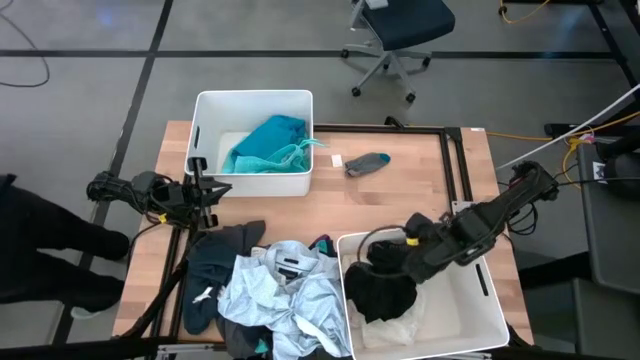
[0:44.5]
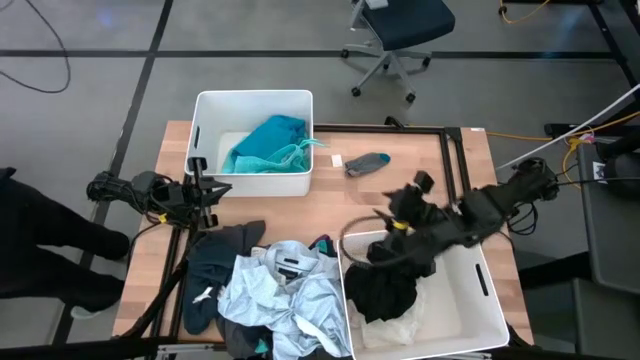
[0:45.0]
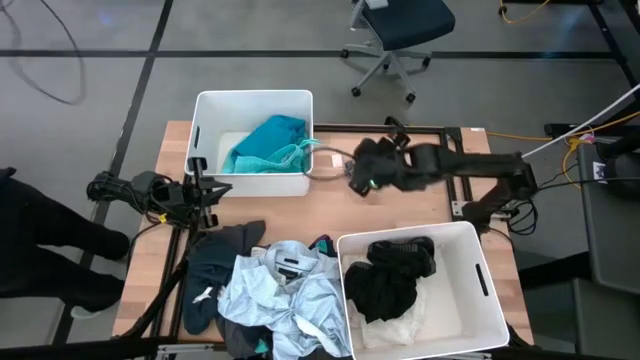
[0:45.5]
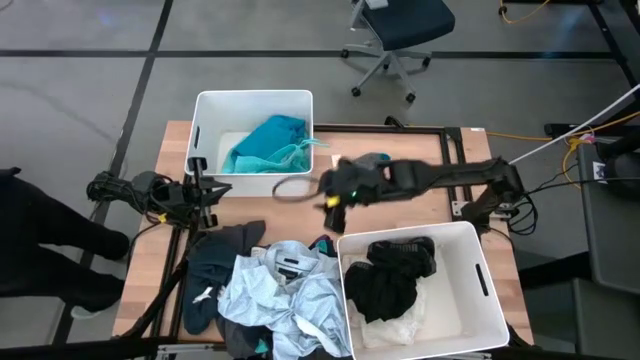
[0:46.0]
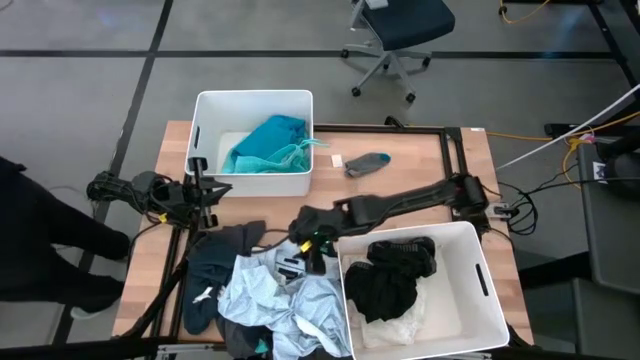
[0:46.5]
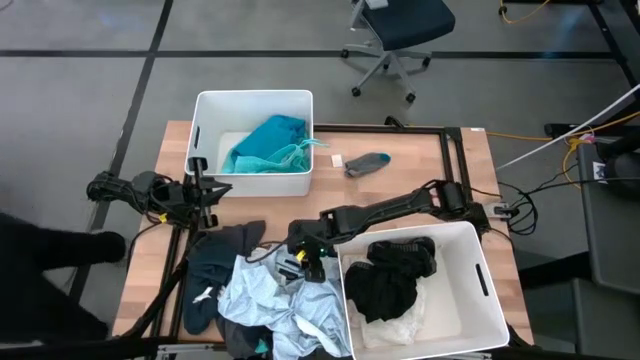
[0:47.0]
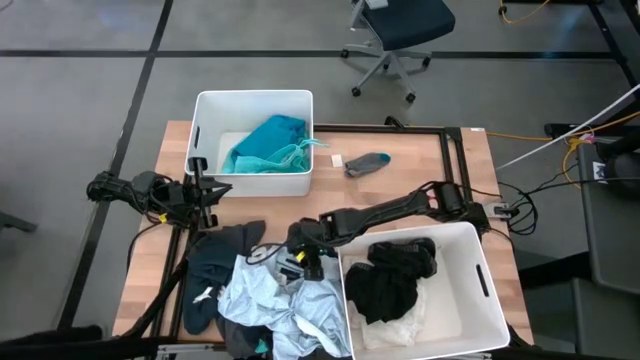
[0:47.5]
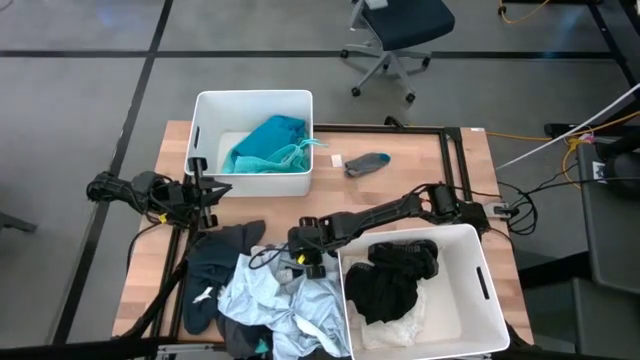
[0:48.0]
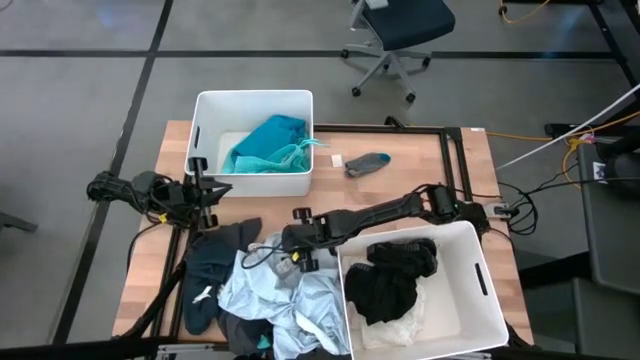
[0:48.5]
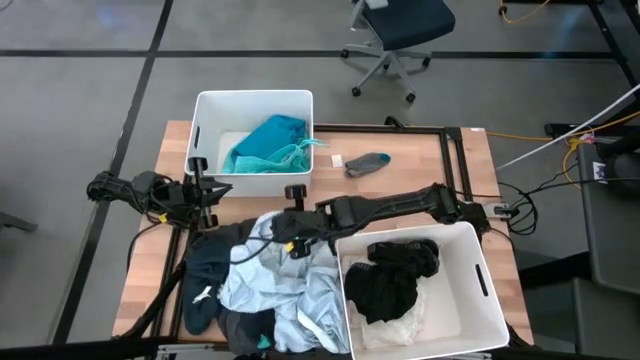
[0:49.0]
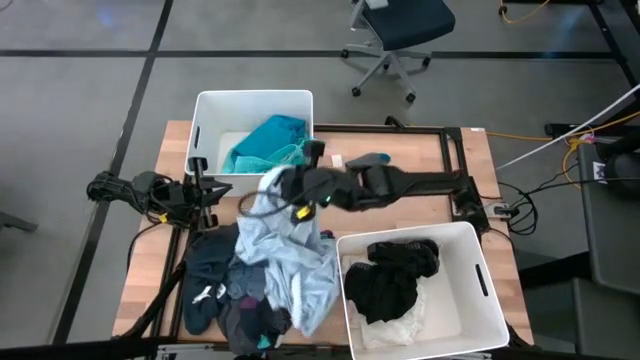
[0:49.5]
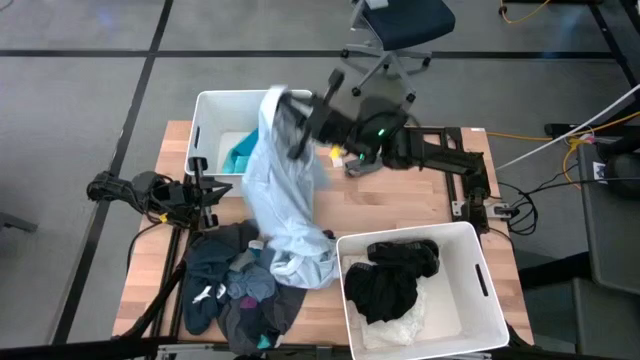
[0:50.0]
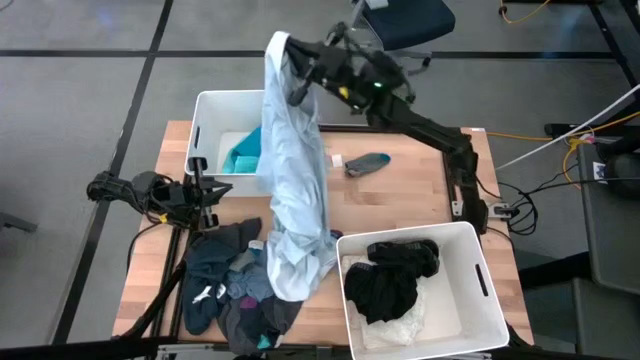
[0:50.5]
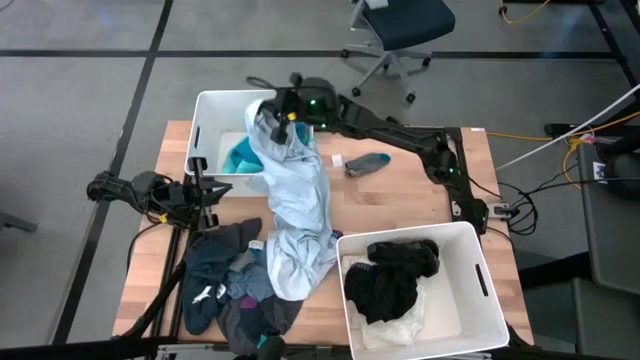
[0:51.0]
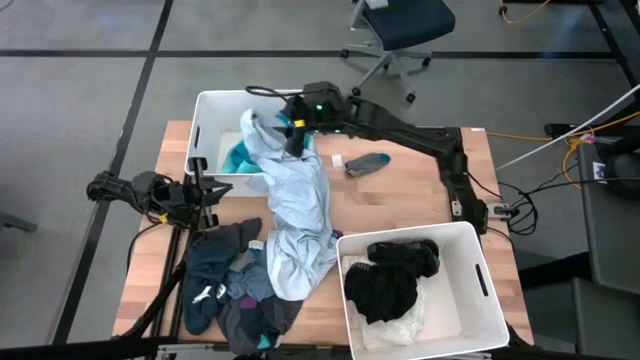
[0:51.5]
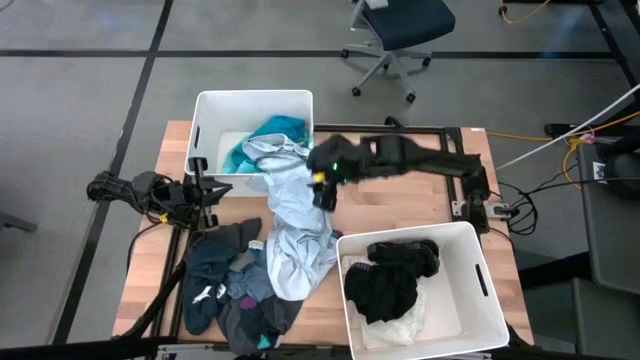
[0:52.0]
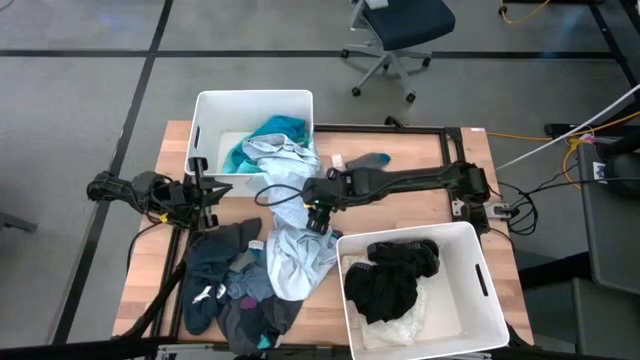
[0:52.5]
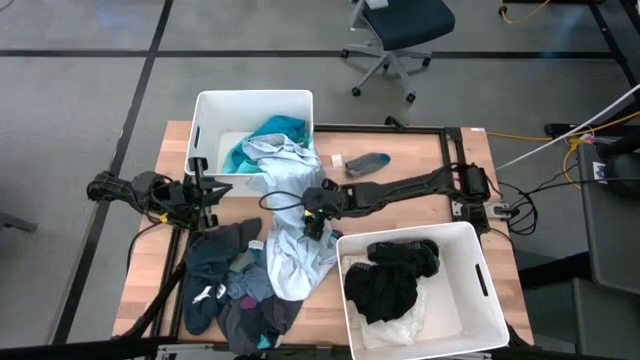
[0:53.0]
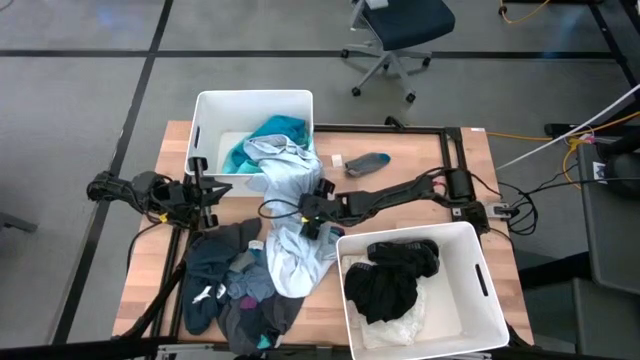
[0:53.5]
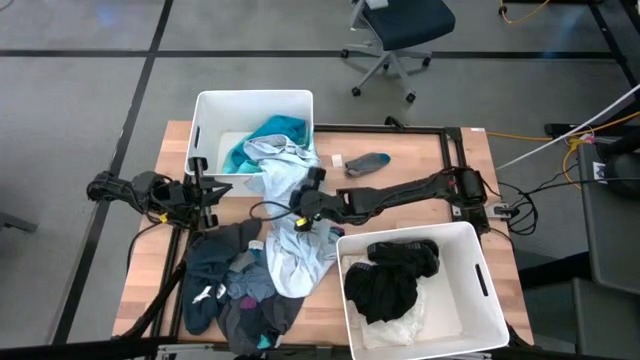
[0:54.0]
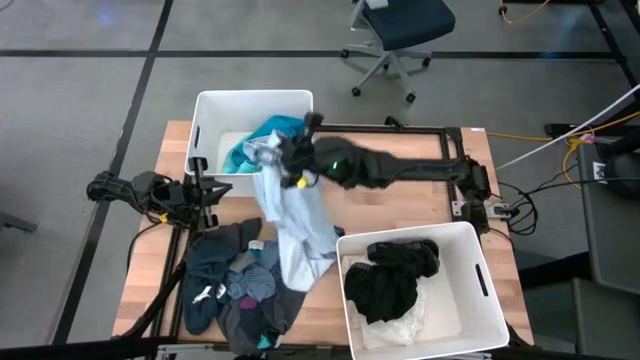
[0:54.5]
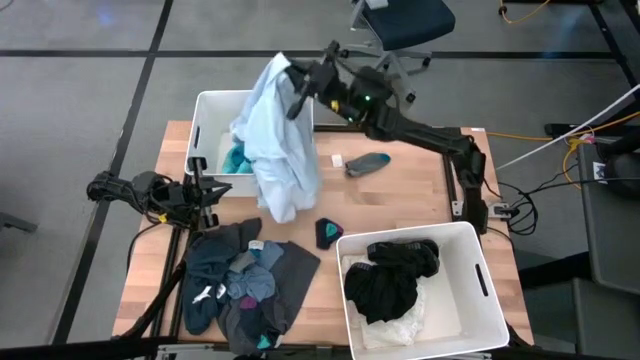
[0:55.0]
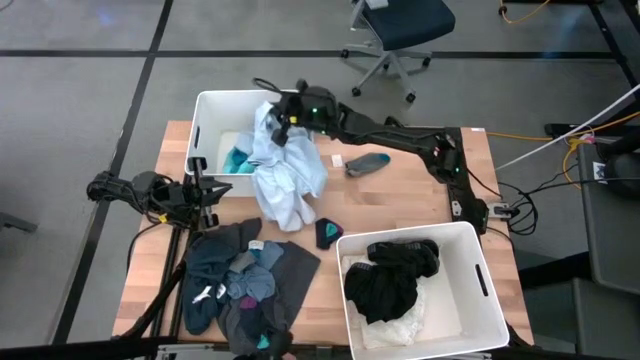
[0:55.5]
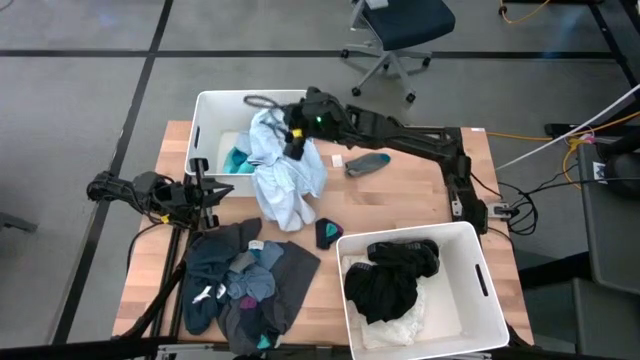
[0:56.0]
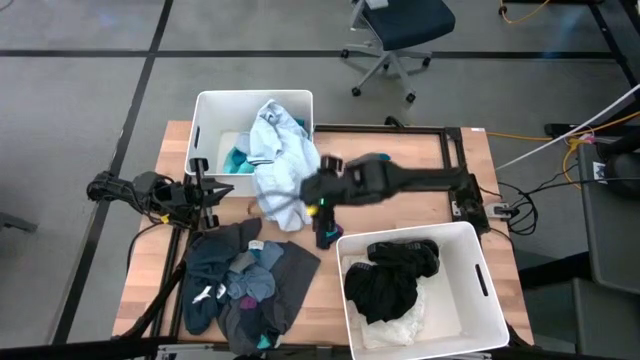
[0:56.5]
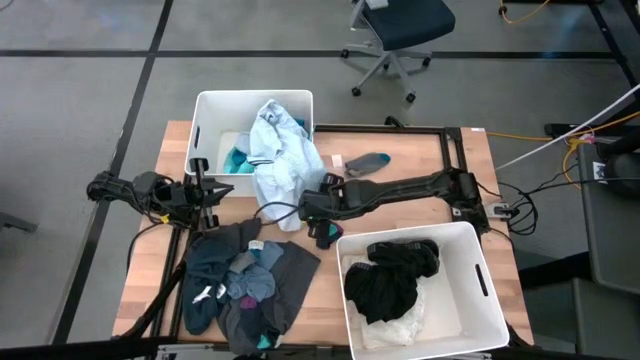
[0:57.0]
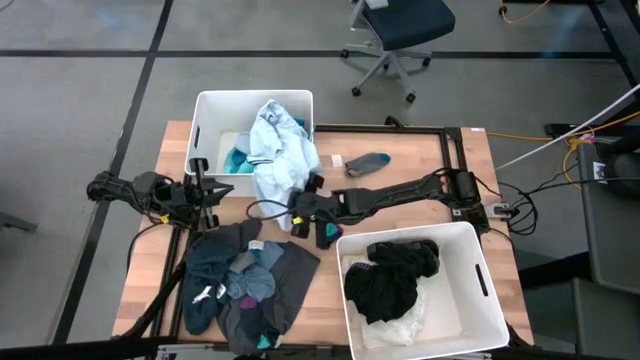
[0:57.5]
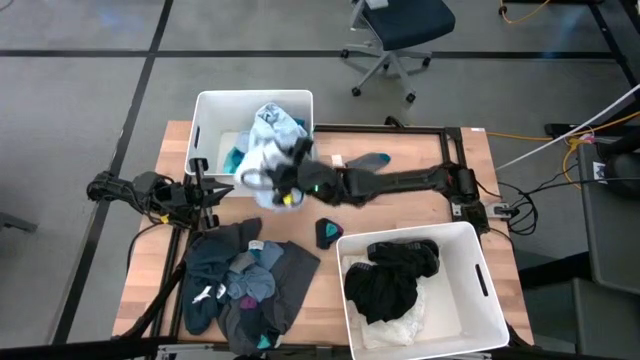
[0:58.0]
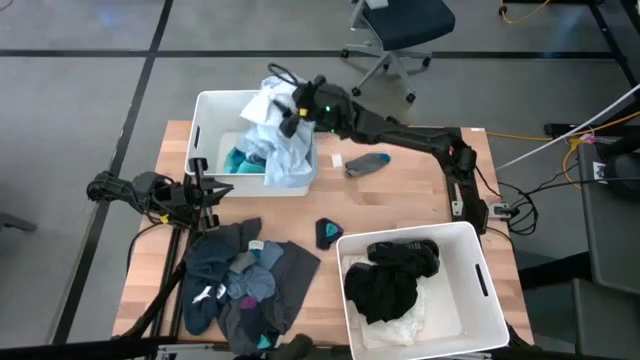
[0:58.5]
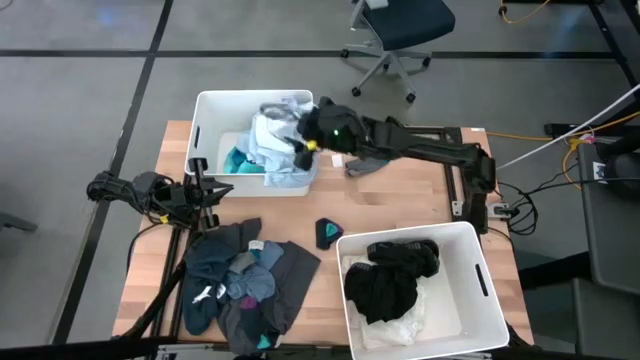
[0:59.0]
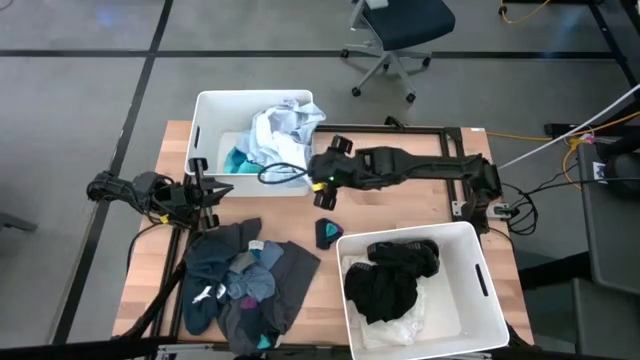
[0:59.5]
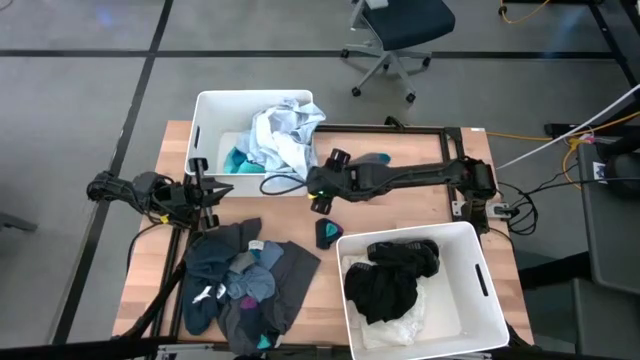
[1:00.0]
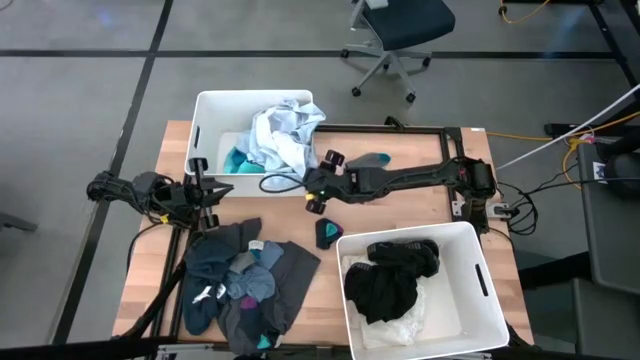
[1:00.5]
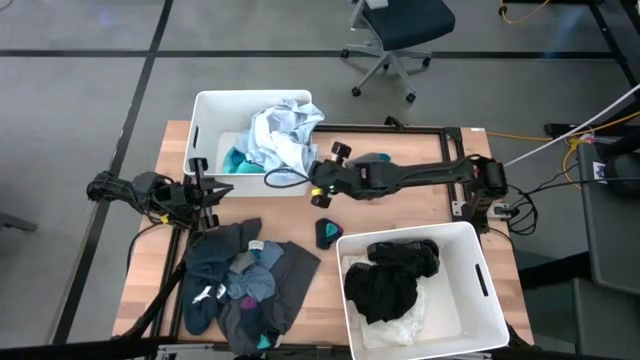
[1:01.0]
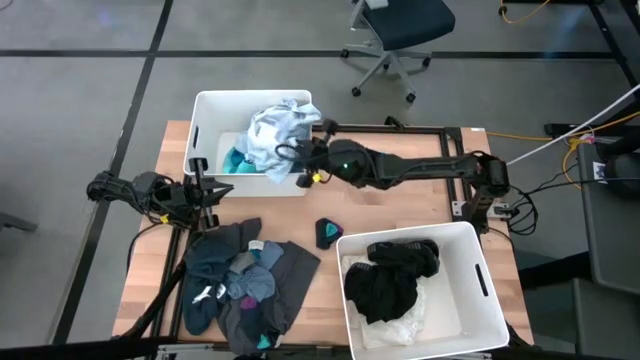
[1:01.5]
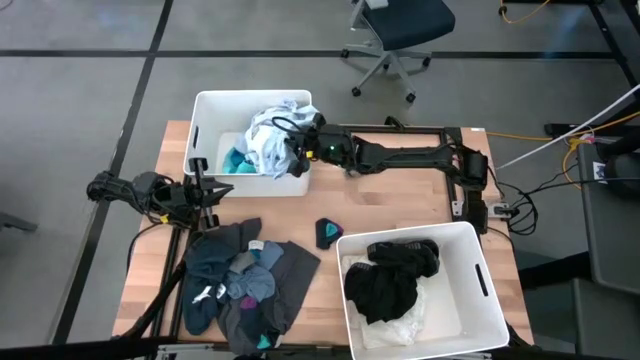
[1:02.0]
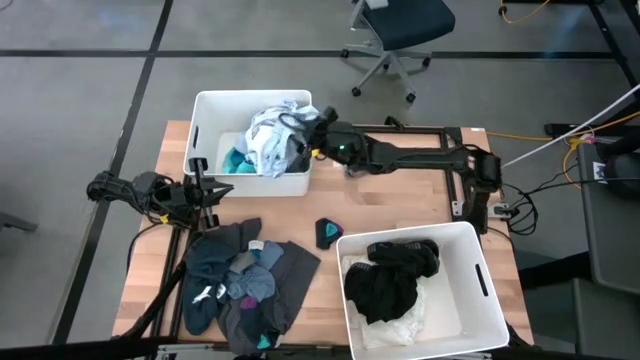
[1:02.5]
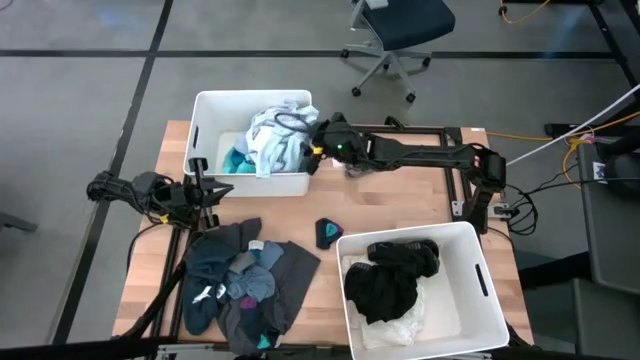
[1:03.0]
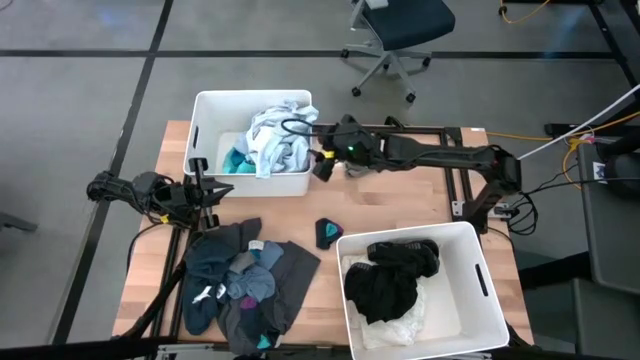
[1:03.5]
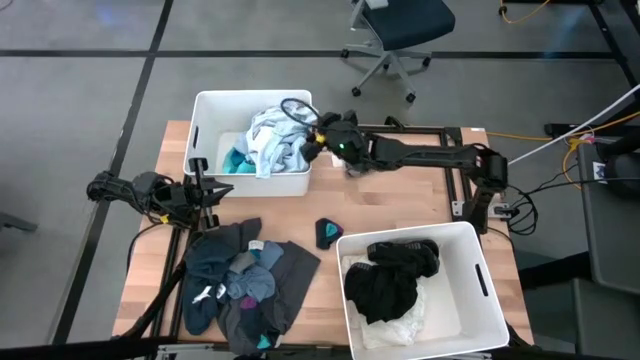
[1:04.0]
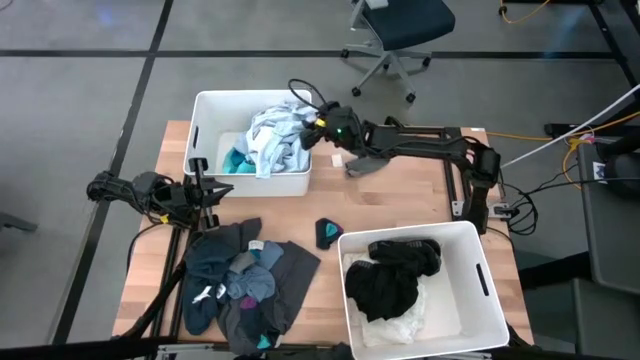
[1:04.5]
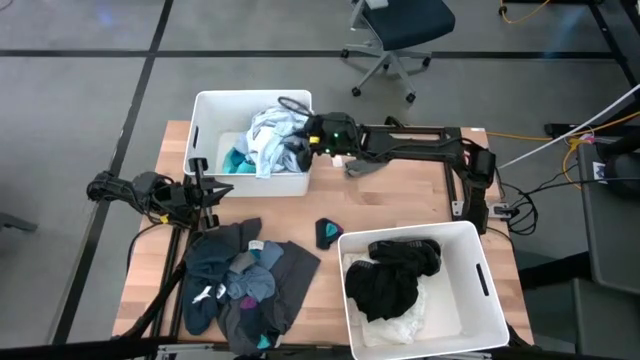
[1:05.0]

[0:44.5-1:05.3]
Task: Sort clothes
Put the gray polo shirt into the top white laundry bin
